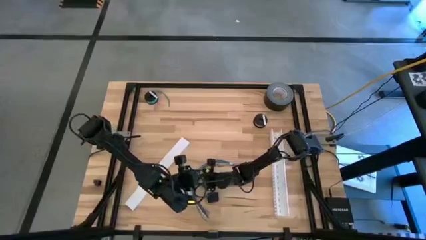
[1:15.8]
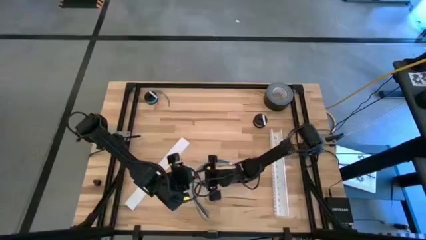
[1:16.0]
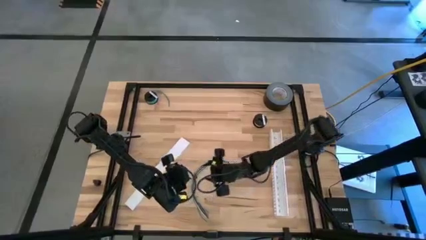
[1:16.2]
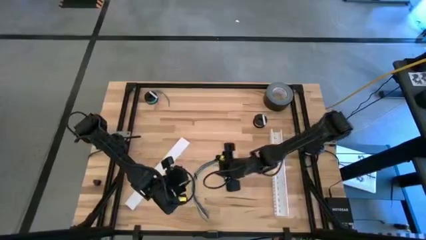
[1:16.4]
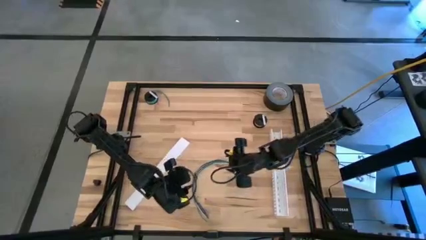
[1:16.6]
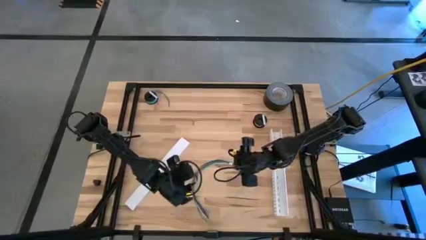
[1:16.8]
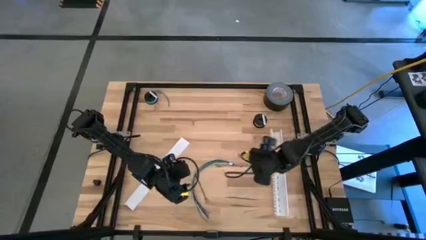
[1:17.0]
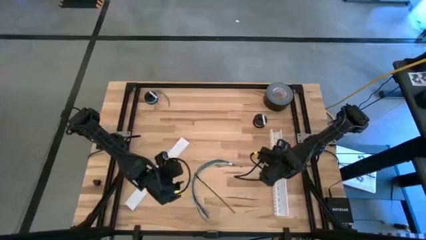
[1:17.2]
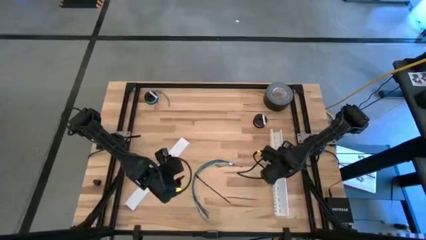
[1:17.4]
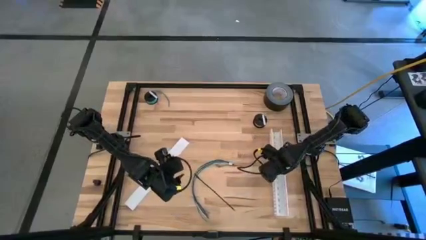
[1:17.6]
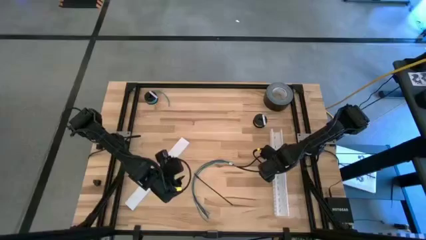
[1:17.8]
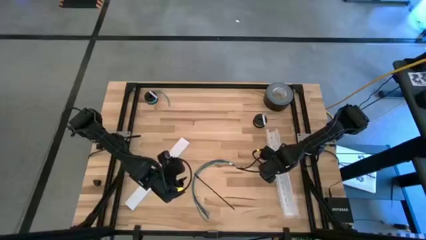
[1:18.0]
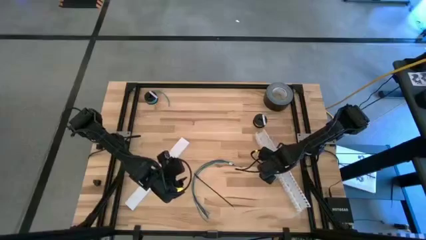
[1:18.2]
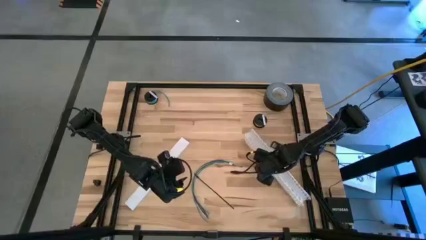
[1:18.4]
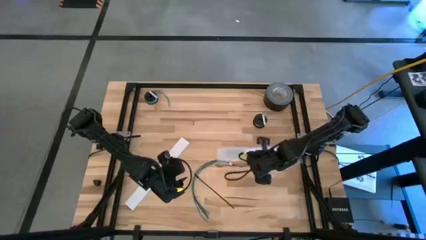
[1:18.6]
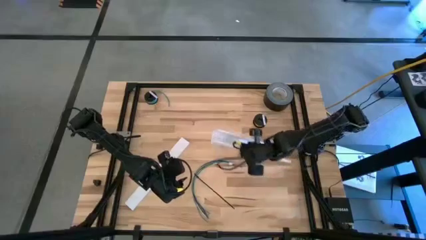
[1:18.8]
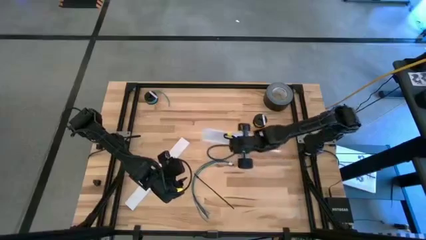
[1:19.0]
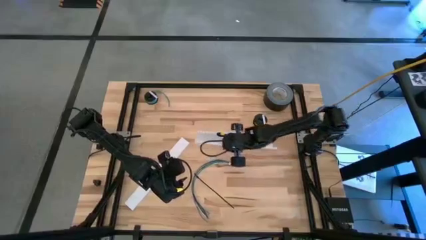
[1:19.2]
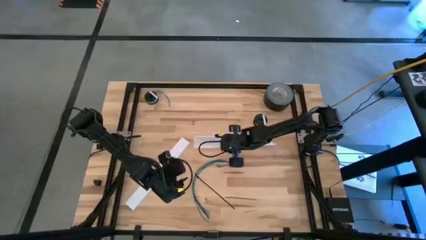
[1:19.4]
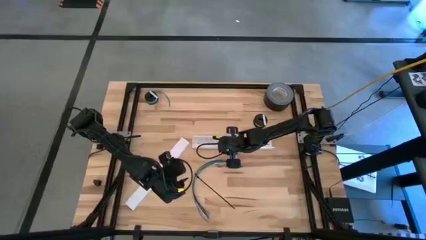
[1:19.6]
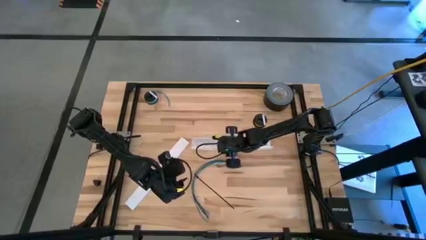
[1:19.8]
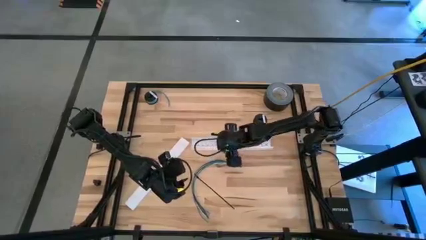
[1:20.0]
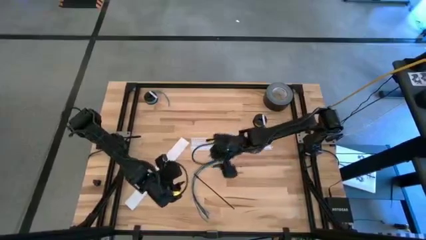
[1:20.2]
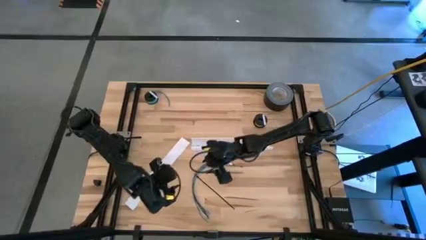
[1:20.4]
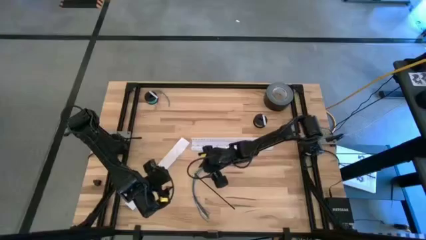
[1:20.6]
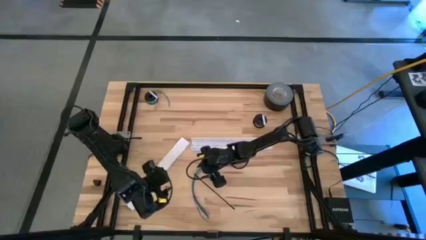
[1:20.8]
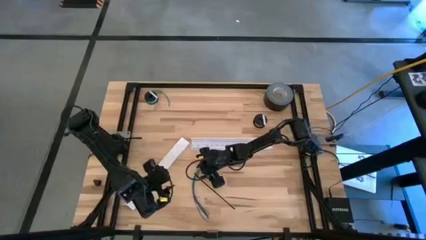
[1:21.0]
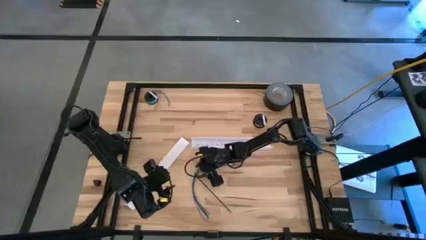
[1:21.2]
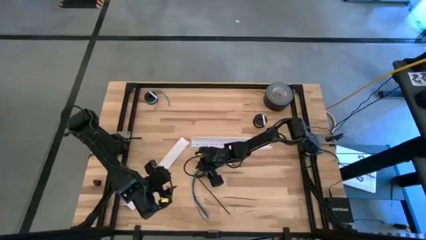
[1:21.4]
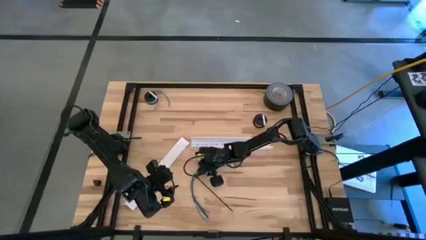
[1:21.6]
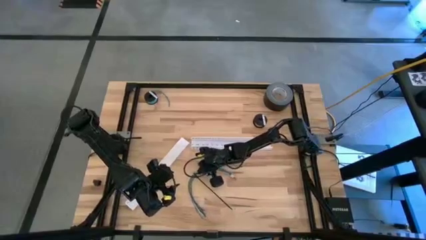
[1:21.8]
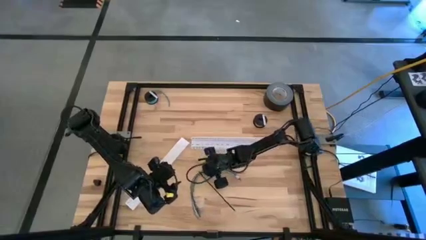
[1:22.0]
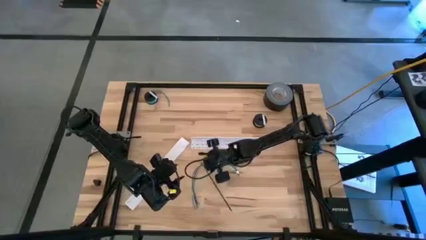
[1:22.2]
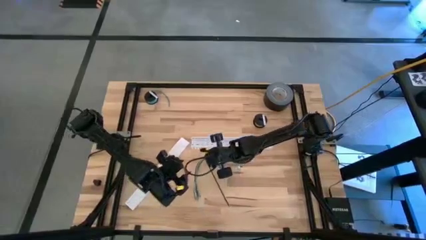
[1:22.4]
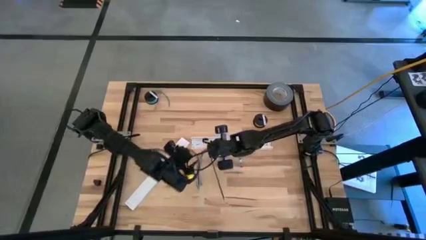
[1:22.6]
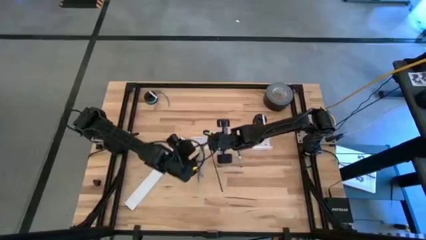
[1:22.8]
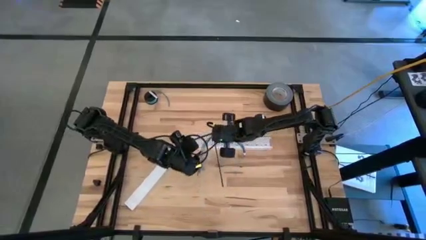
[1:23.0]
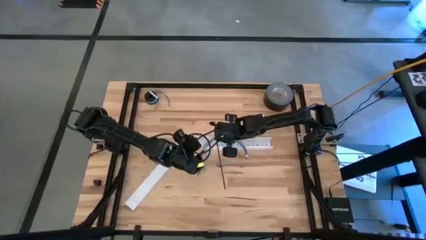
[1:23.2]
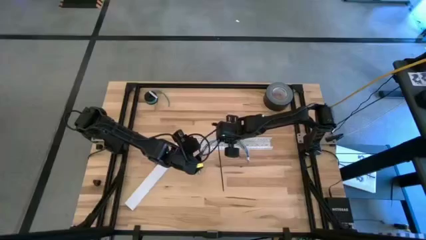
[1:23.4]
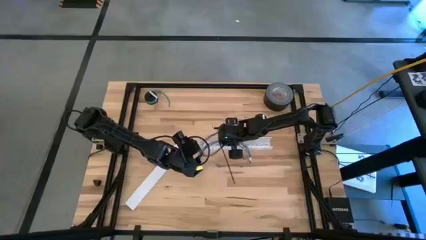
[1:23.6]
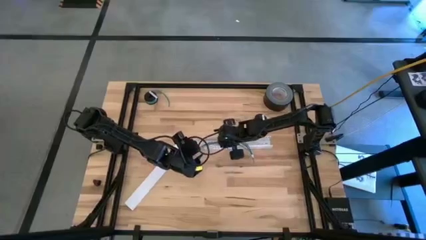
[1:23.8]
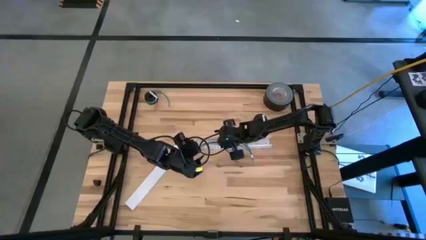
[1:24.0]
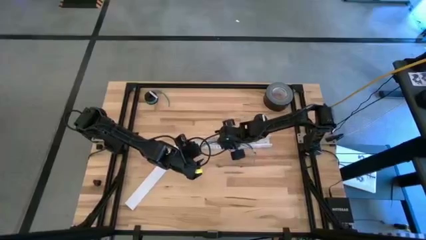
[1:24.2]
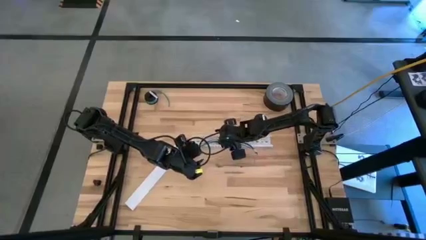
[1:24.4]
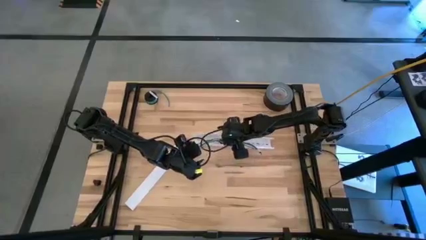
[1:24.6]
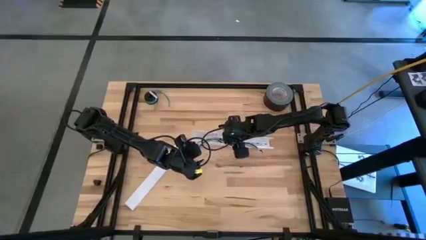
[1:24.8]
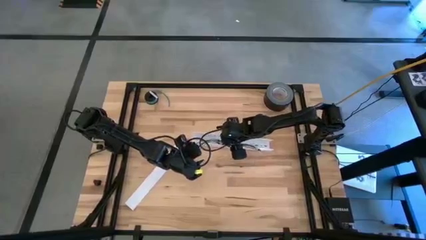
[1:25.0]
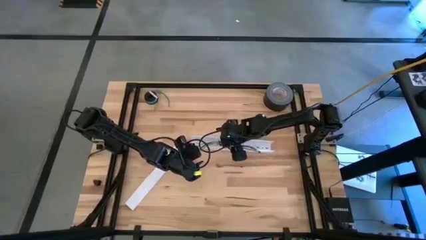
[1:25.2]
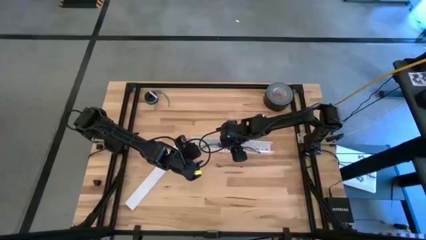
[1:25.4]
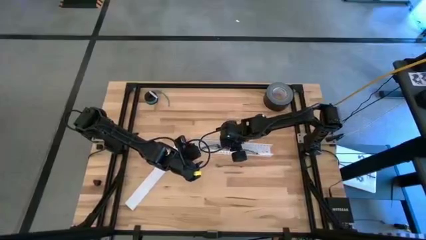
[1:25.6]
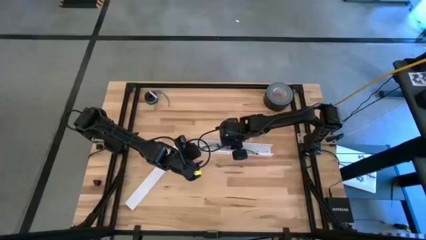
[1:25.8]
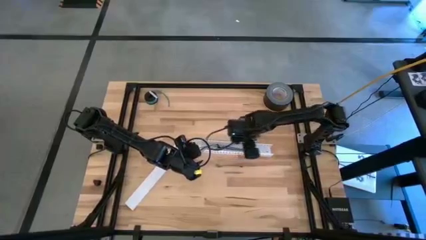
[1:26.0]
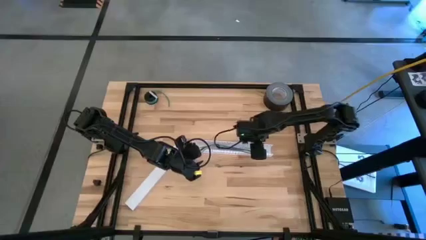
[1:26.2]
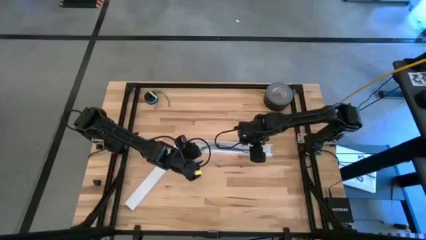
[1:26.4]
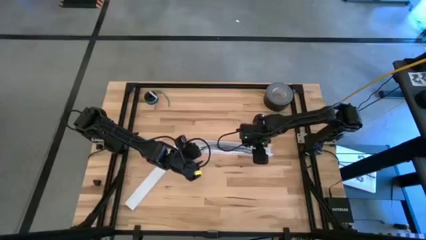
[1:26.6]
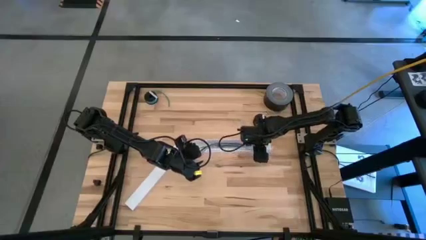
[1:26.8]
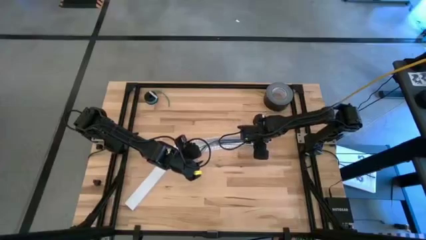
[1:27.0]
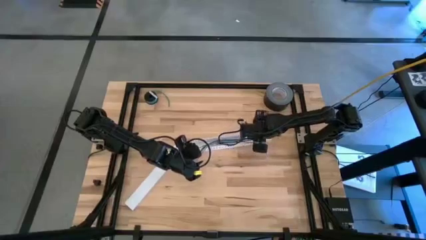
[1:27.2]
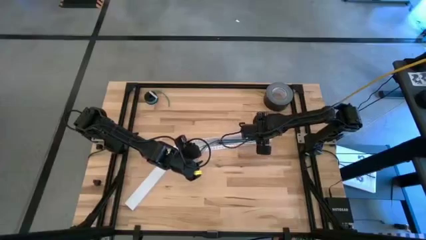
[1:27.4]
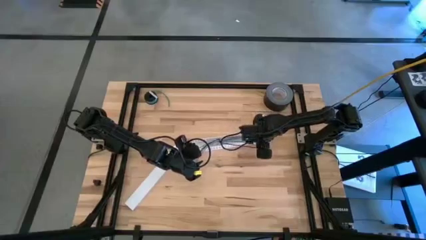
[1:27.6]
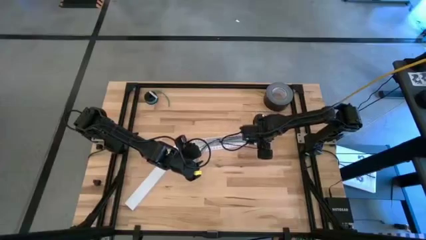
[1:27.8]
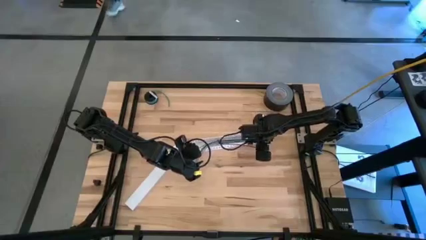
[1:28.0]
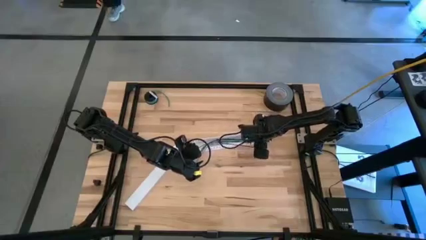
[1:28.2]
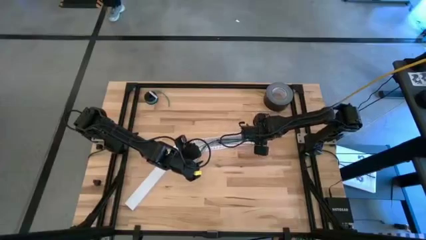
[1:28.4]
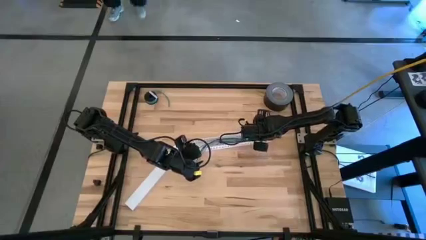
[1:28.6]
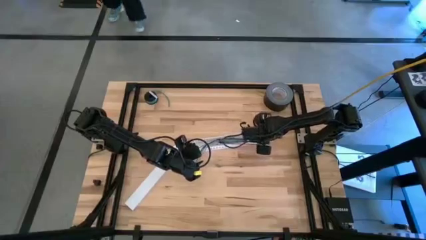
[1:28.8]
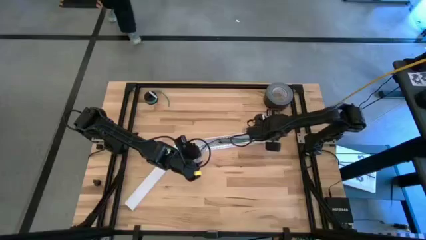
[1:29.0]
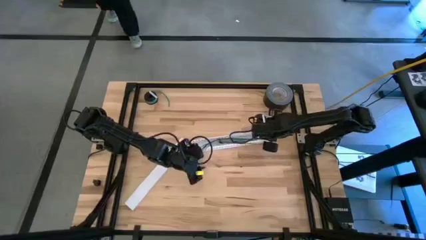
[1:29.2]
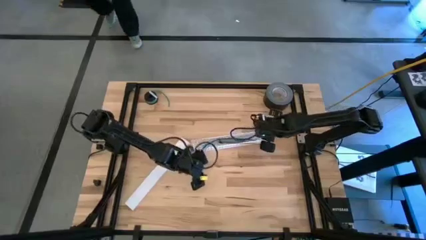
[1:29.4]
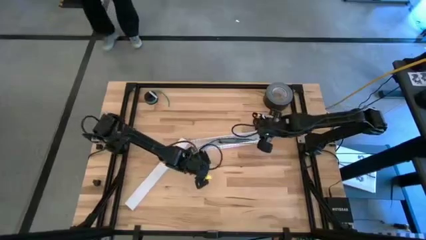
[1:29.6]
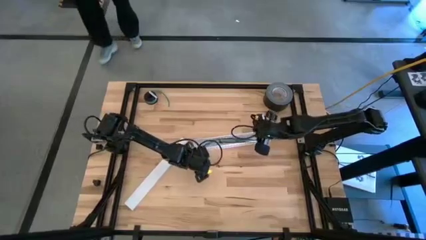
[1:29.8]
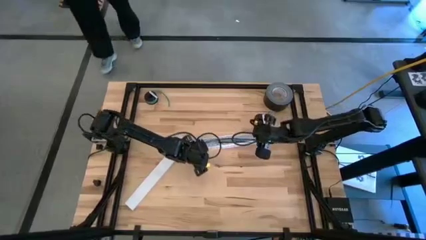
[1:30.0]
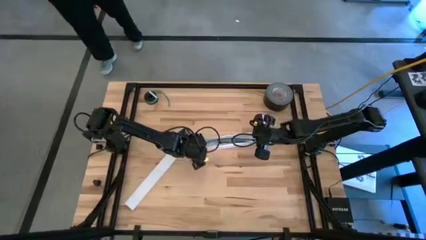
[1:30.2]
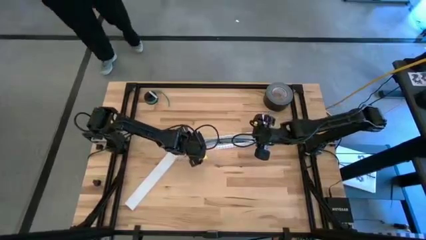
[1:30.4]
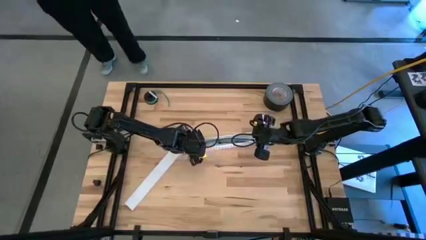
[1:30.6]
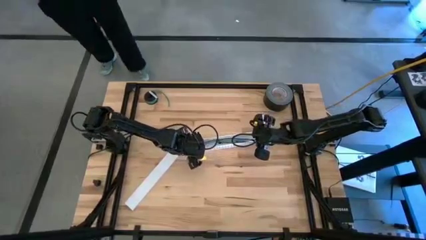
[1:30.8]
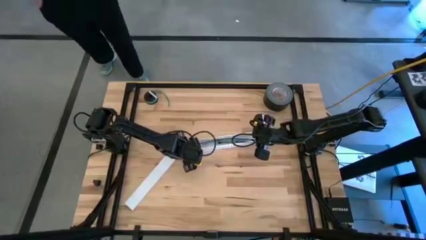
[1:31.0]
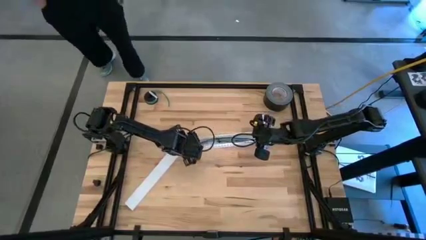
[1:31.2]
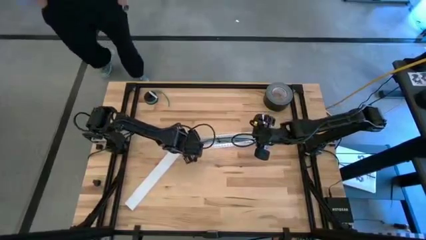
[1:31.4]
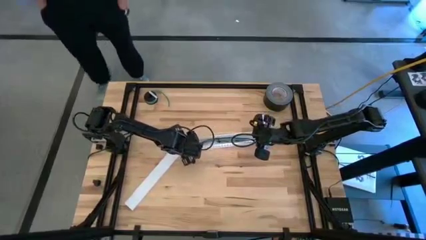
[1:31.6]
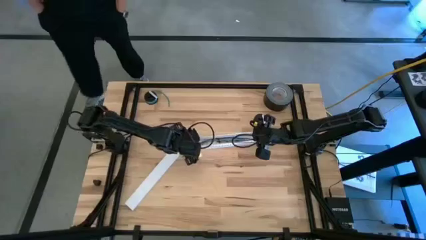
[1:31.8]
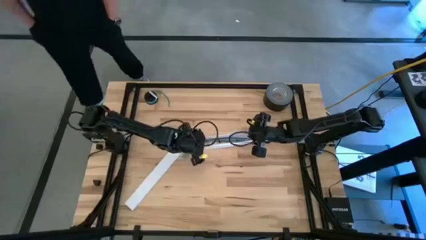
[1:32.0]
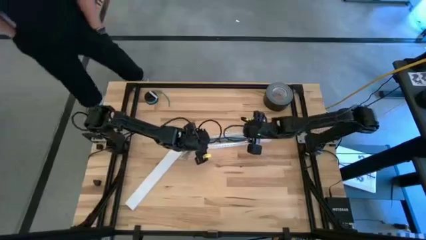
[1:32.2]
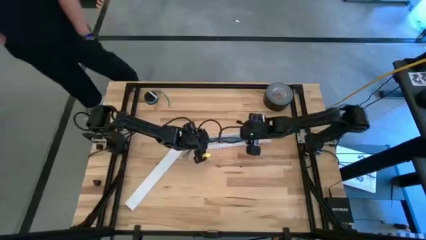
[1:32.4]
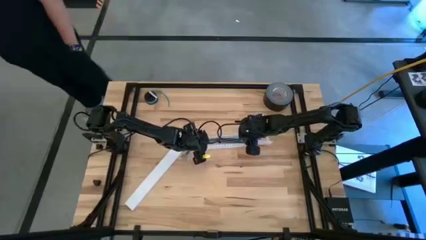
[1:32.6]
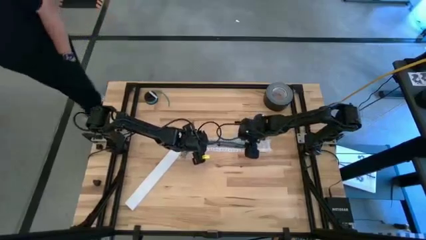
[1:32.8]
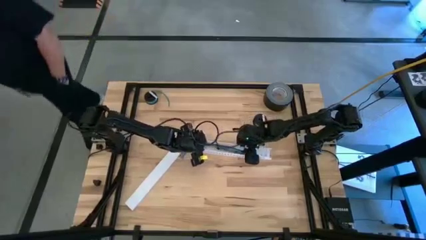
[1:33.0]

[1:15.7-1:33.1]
Task: Ziptie cables
Insert the ziptied cable wires into the white cable duct
